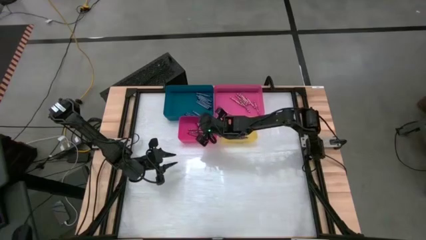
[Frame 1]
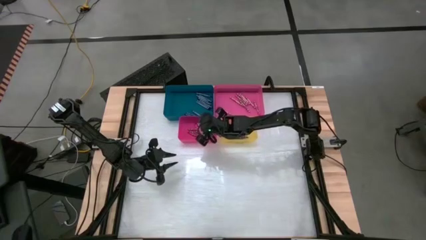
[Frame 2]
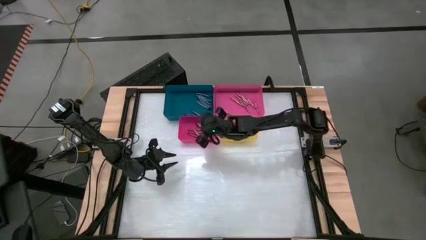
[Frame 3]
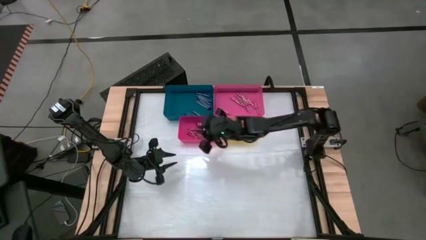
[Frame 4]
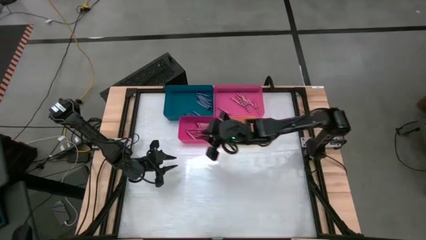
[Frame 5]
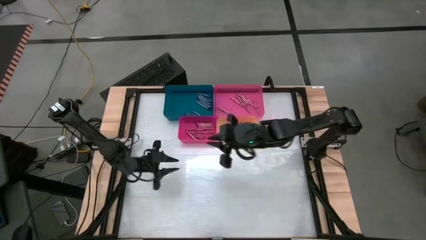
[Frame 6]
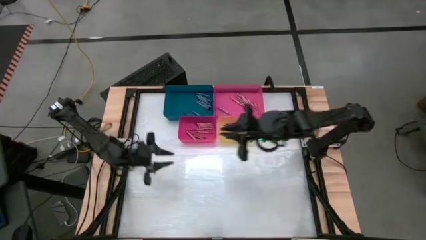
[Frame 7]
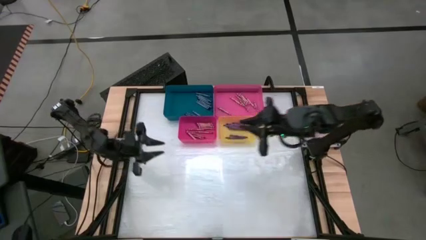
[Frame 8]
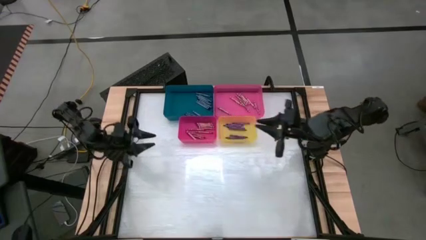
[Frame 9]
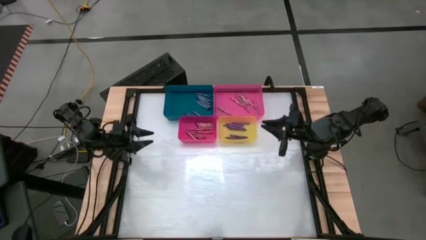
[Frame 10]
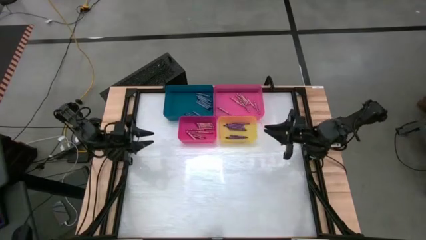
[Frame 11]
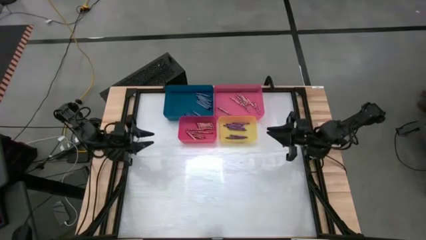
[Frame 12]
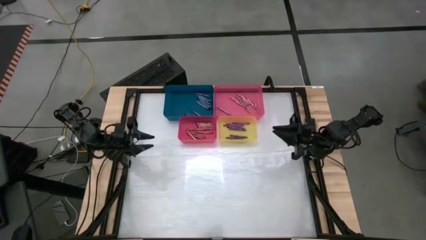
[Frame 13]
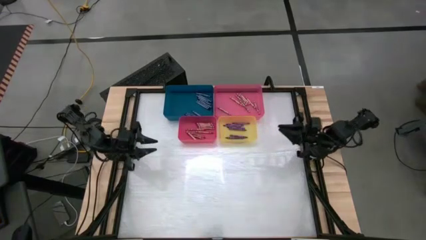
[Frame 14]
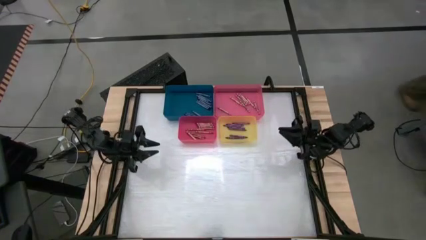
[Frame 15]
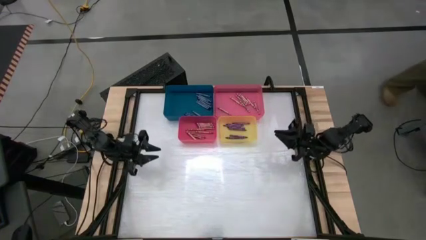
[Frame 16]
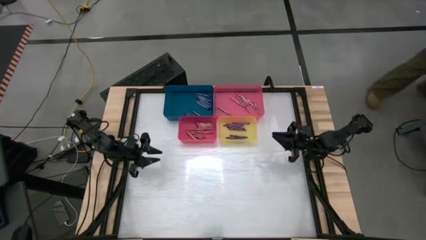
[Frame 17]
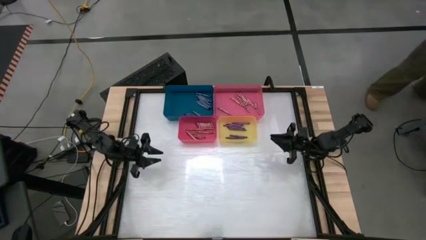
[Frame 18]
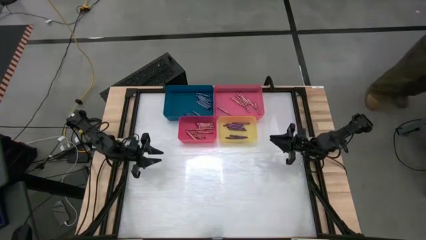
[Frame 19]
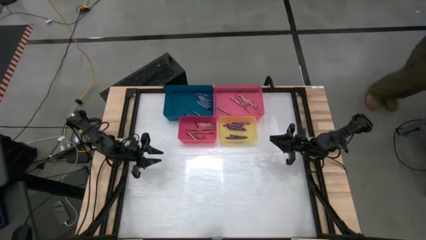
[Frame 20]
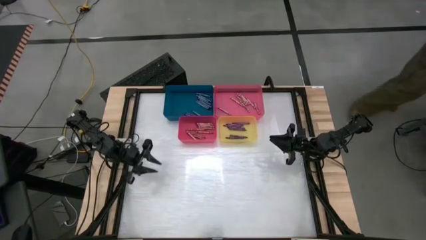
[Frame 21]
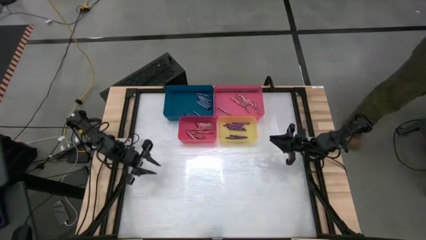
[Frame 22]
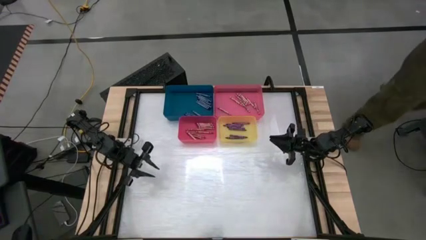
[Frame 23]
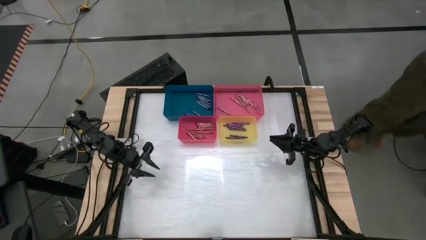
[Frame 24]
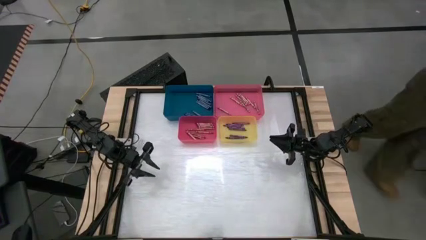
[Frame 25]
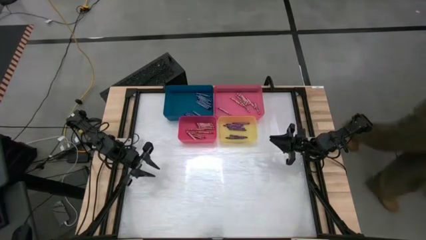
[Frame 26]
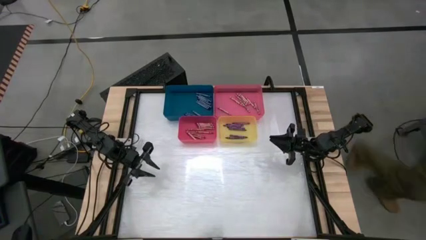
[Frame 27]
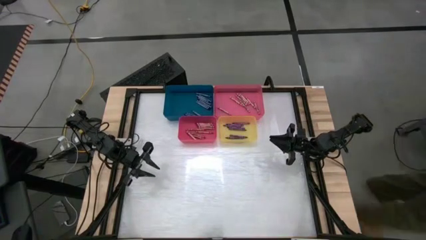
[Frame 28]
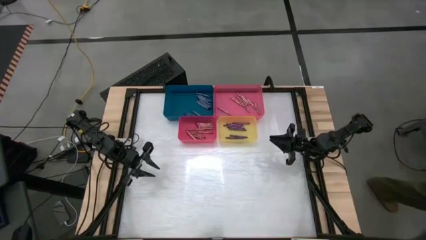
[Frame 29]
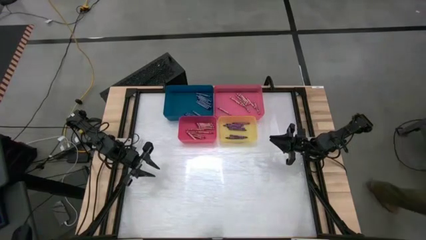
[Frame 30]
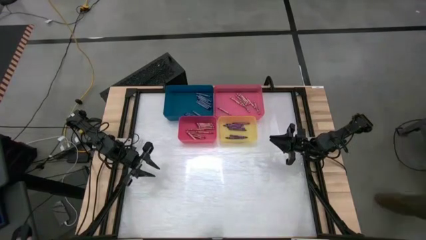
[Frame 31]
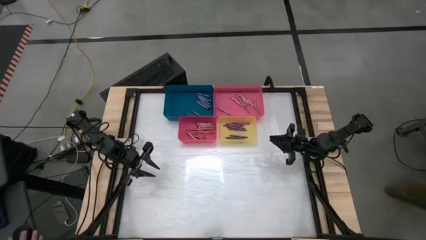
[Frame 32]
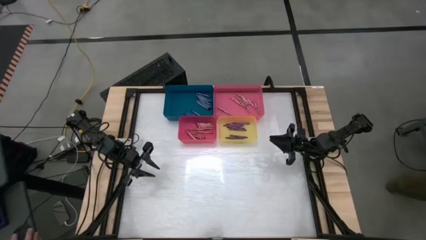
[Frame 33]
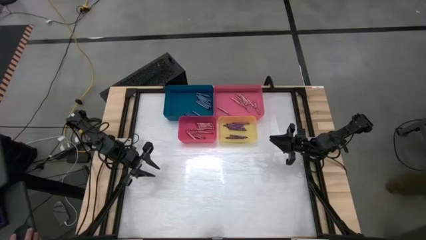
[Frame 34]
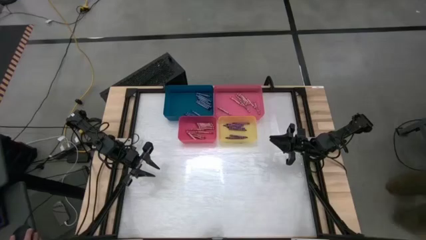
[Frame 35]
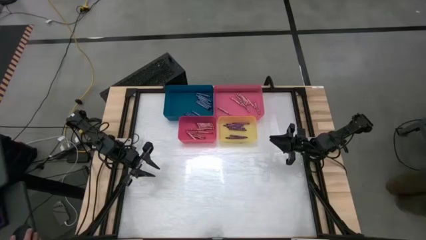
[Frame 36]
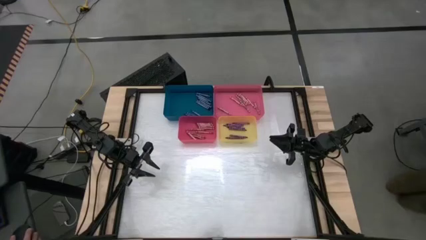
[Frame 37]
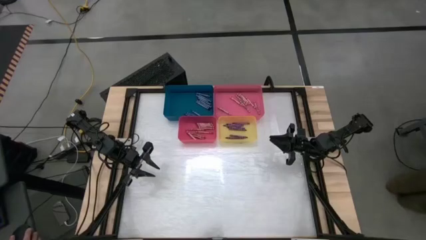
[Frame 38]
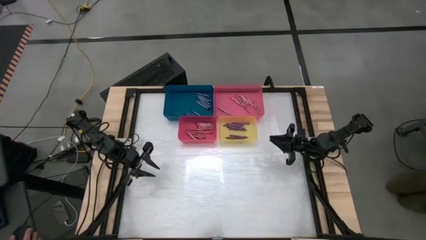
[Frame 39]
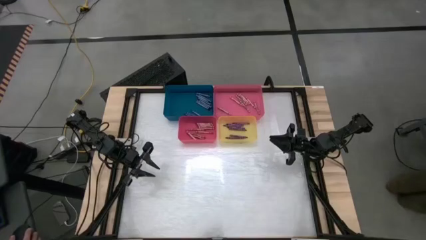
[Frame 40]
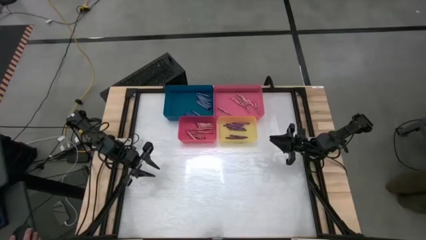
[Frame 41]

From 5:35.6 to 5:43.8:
Task: Sort crayons
Return to Home Position

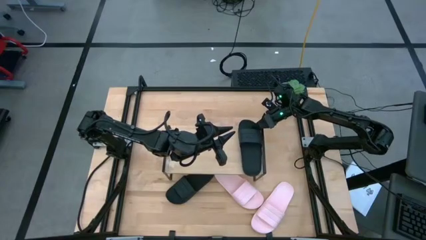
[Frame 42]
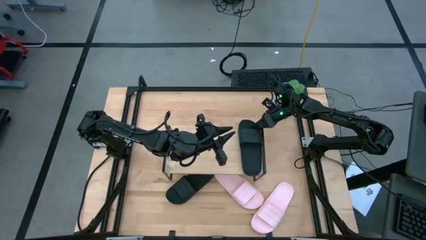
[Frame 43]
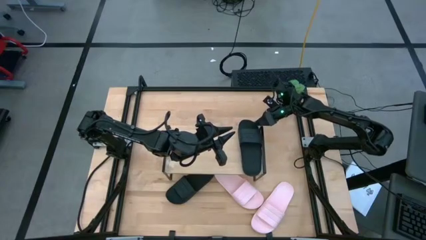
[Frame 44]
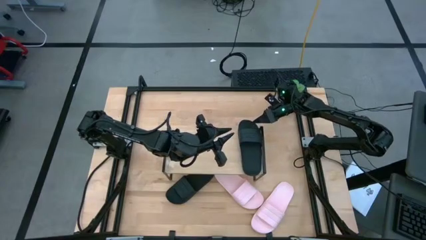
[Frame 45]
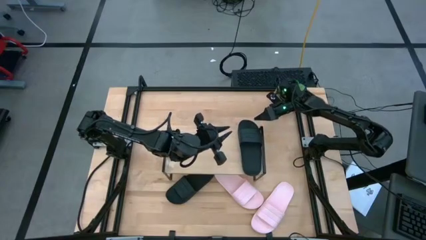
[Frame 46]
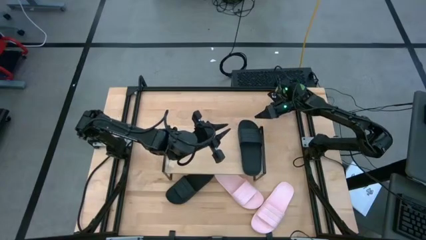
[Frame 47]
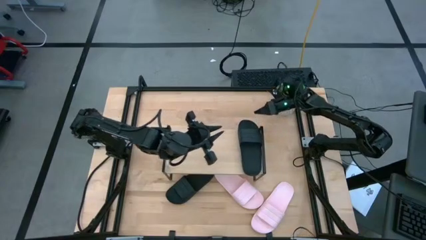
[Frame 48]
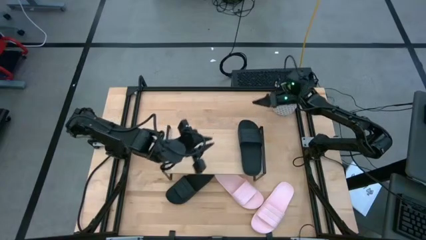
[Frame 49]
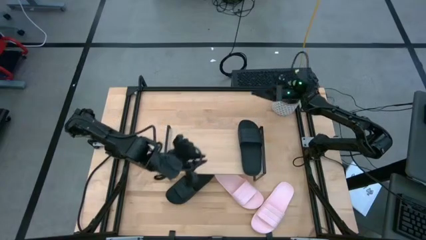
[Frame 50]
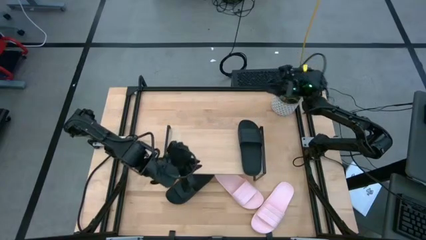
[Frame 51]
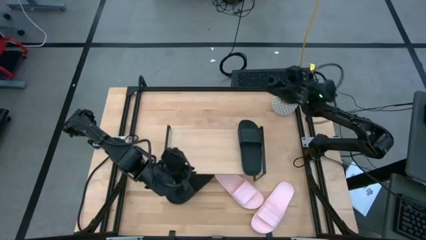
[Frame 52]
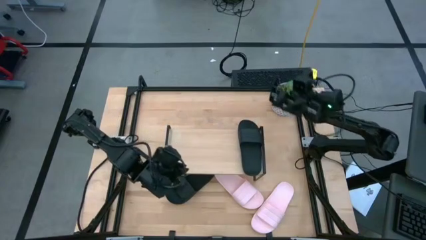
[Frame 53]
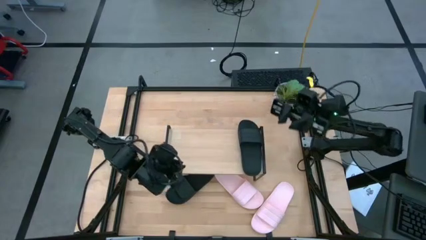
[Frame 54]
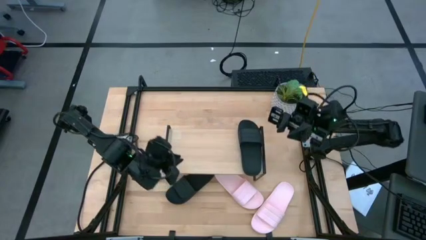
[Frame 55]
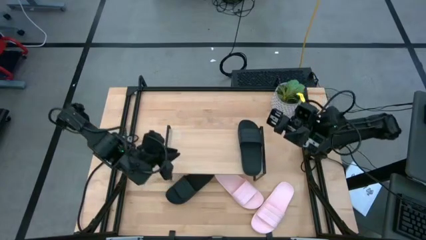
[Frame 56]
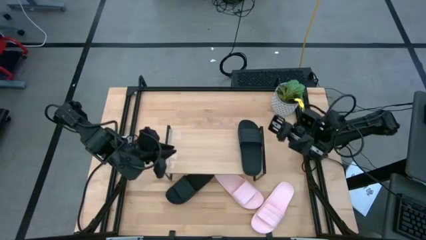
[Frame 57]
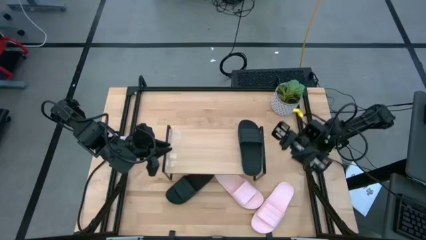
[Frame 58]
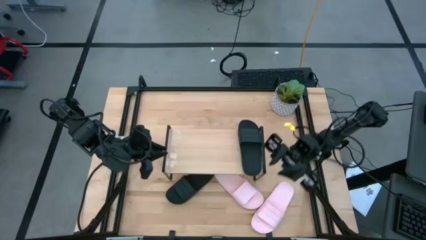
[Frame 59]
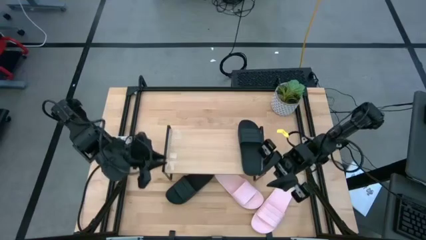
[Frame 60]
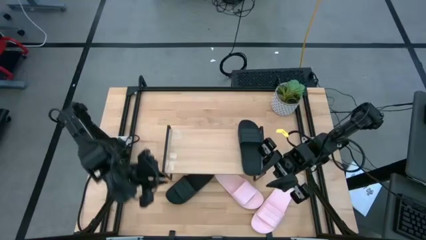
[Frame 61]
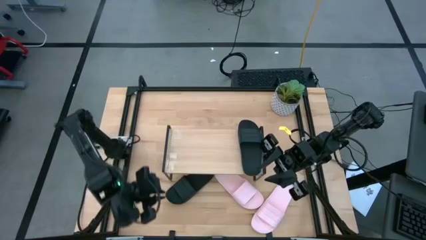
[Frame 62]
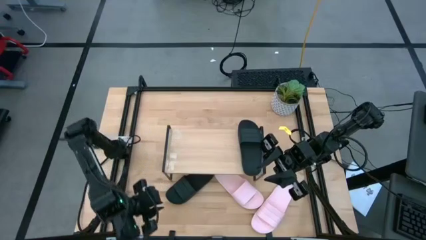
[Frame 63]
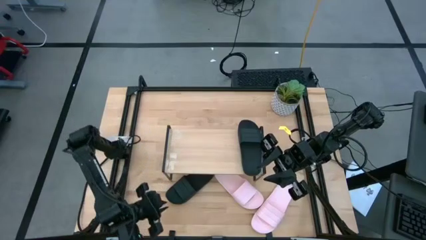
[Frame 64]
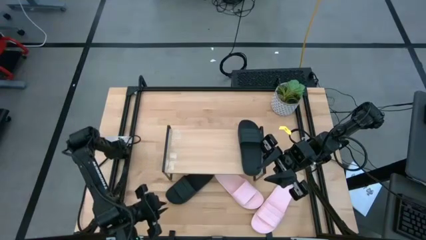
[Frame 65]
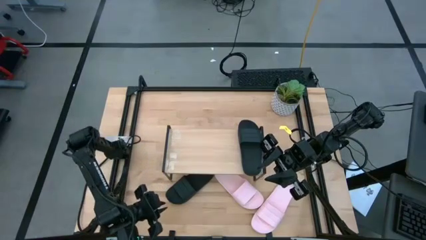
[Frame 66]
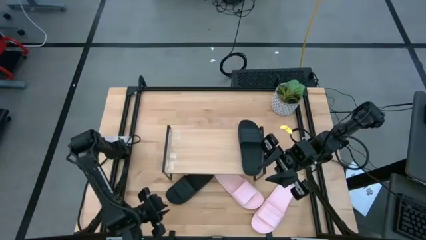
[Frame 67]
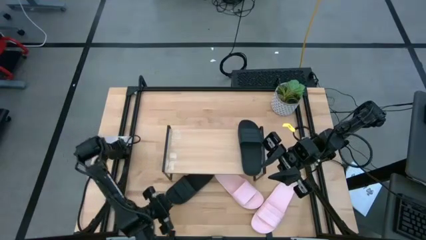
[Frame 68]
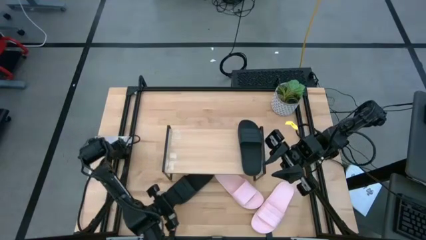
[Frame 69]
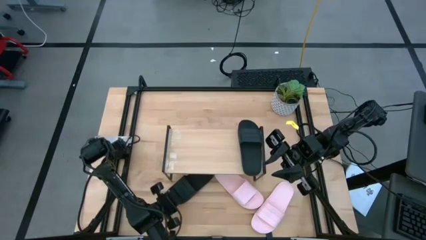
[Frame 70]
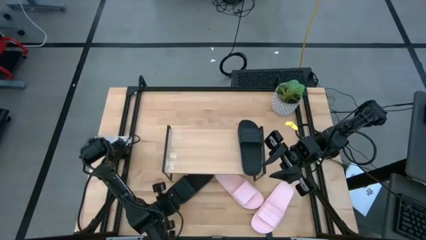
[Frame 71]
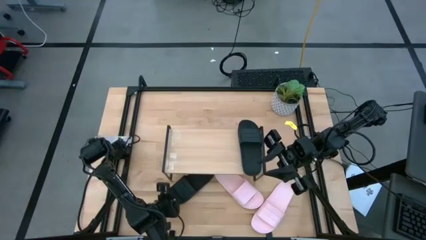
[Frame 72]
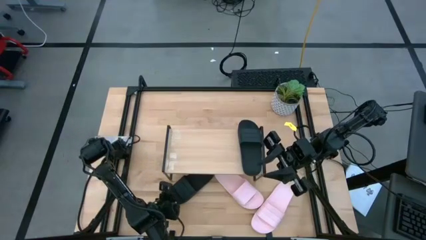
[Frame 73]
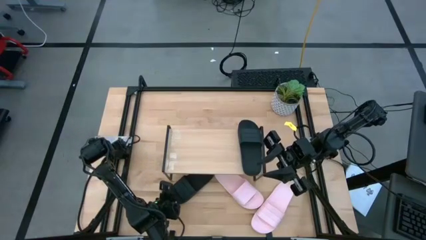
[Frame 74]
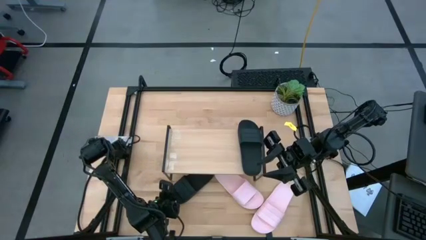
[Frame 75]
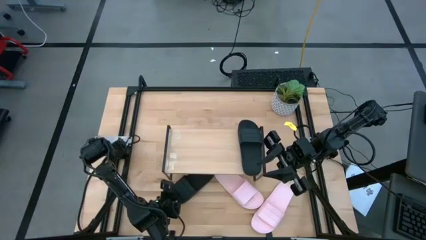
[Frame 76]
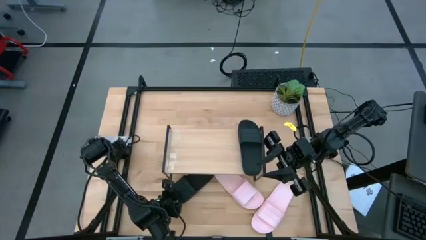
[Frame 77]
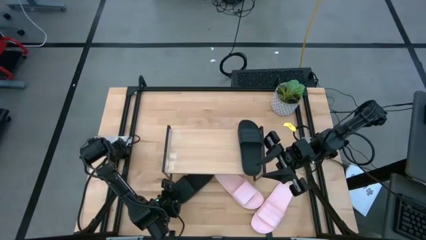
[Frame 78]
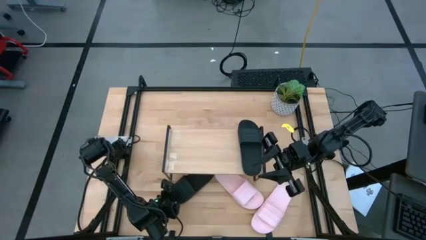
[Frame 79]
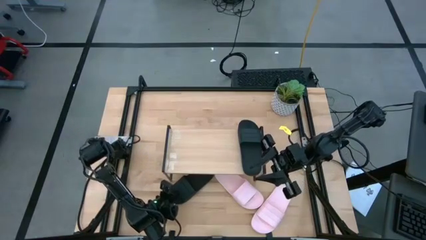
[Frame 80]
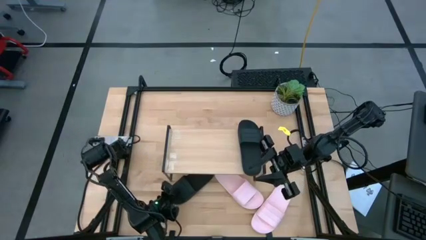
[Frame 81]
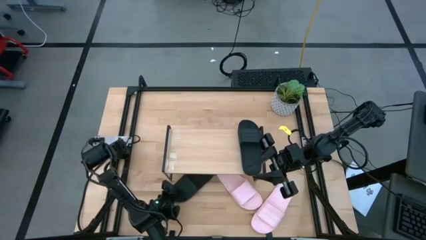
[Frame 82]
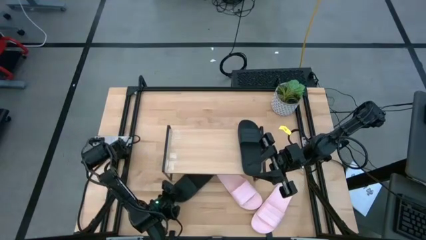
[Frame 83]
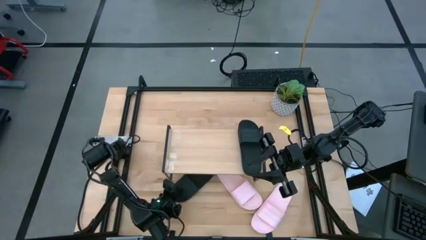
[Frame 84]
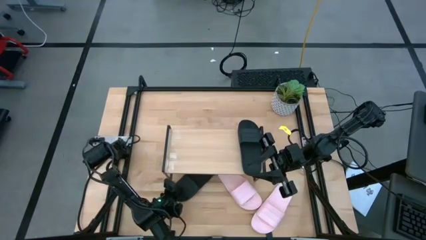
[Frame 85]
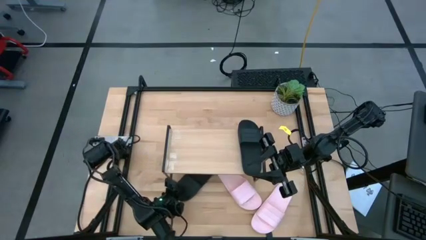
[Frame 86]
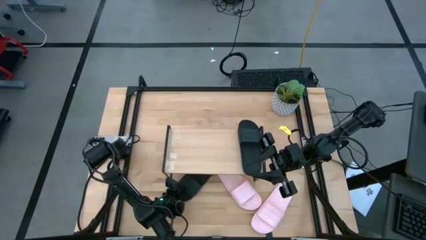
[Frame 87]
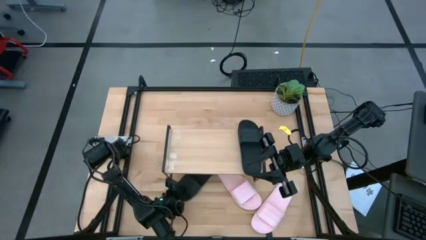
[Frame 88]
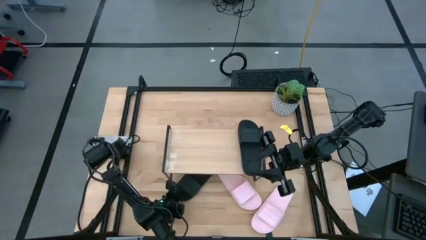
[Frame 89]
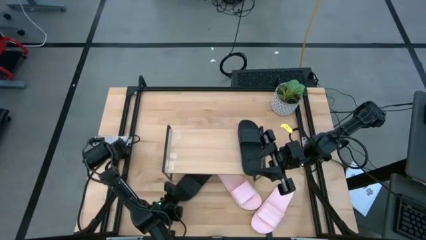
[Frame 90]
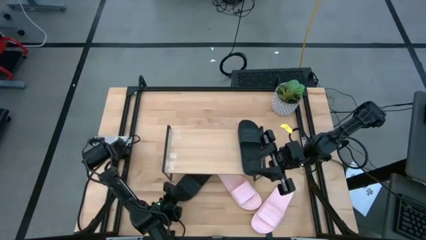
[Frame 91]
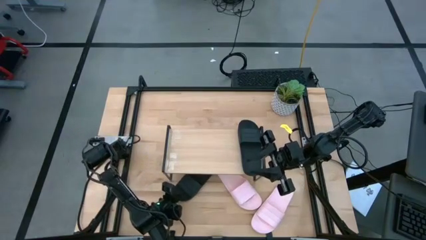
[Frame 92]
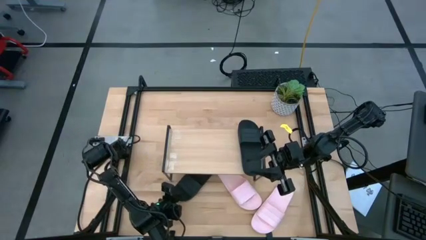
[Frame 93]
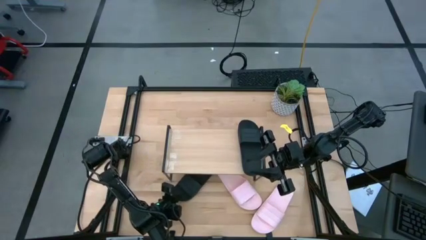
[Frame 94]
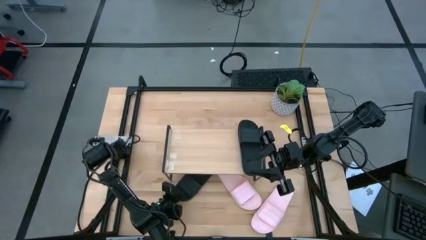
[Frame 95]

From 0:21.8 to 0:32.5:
Task: Pick and place slides into the shelf
Put the black slipper on the shelf
